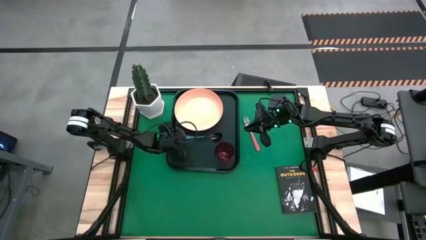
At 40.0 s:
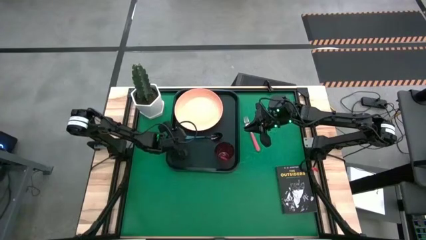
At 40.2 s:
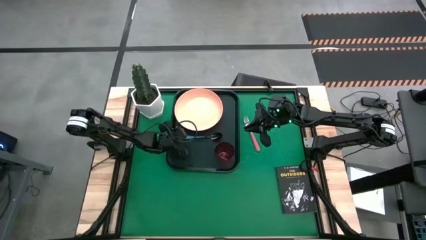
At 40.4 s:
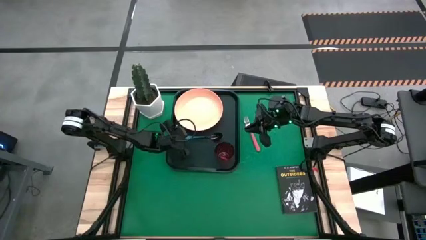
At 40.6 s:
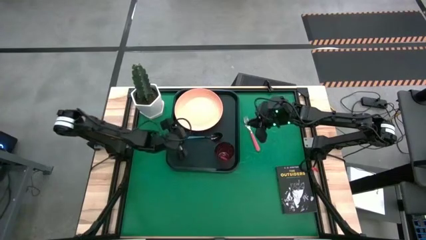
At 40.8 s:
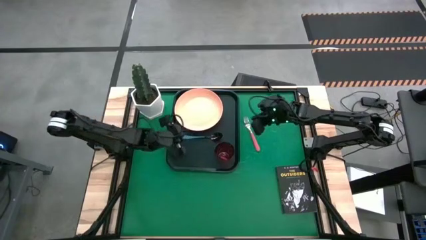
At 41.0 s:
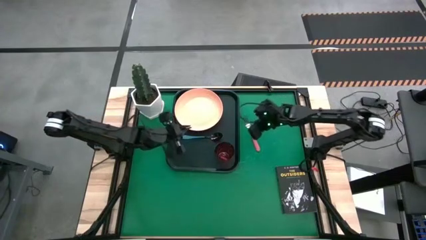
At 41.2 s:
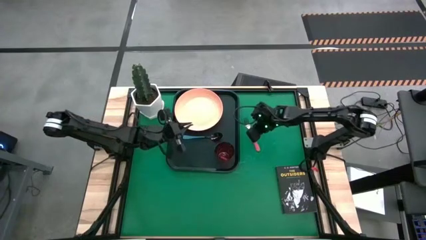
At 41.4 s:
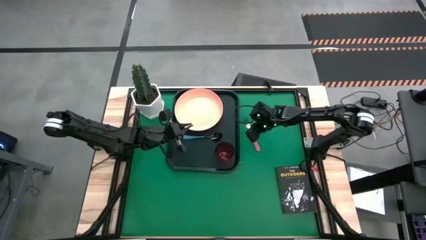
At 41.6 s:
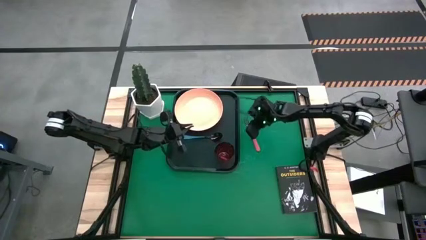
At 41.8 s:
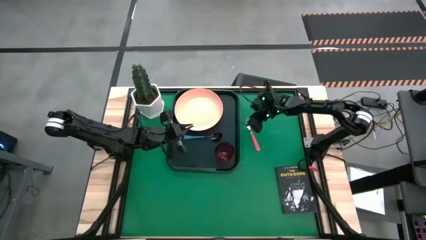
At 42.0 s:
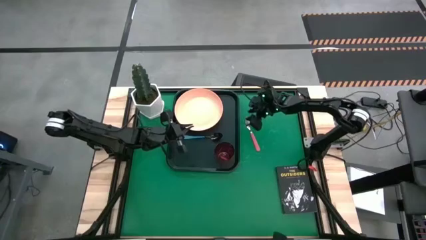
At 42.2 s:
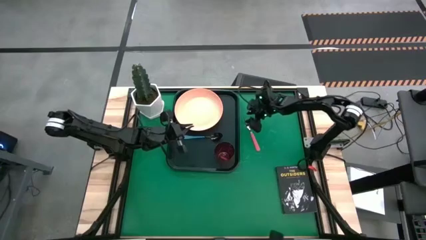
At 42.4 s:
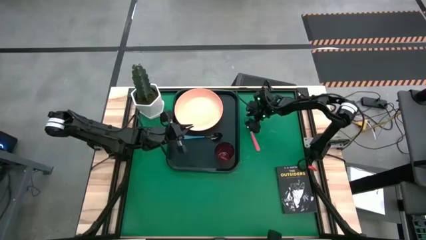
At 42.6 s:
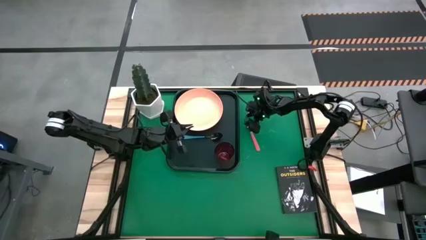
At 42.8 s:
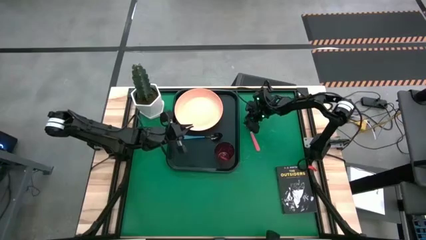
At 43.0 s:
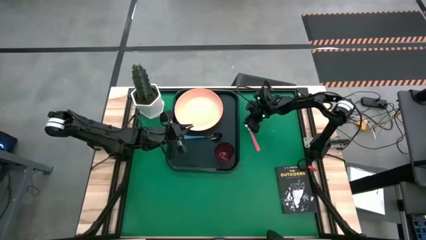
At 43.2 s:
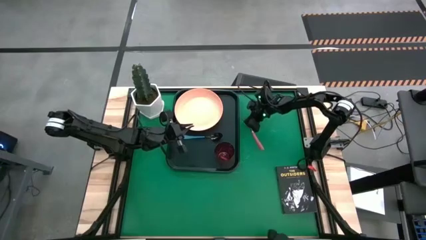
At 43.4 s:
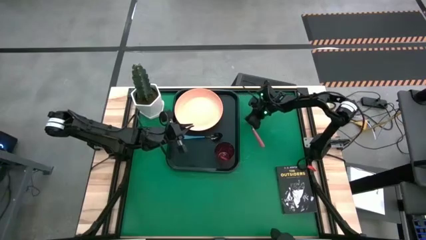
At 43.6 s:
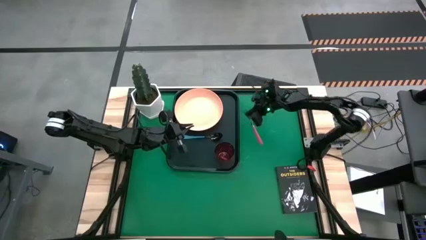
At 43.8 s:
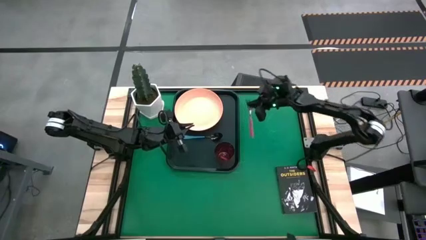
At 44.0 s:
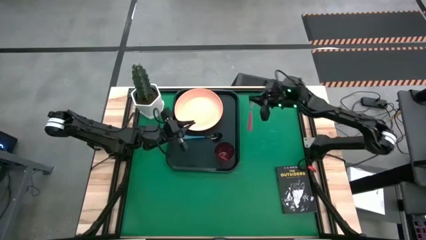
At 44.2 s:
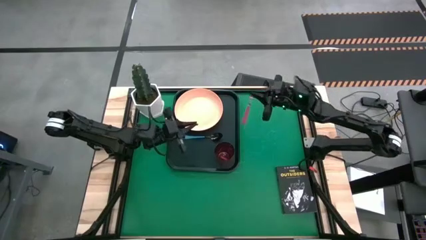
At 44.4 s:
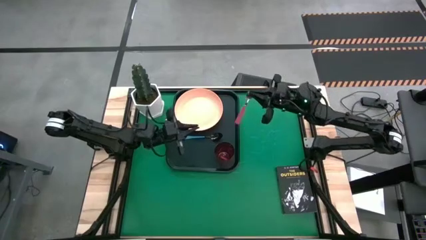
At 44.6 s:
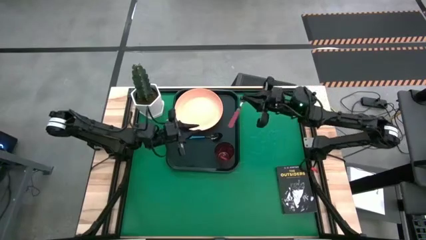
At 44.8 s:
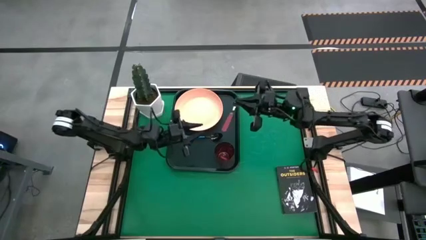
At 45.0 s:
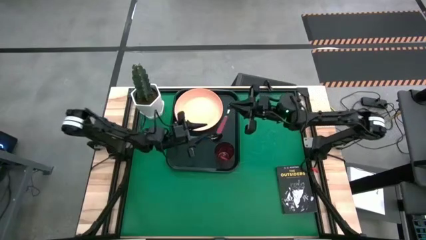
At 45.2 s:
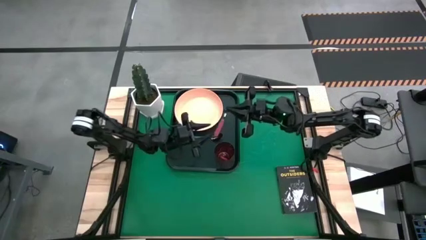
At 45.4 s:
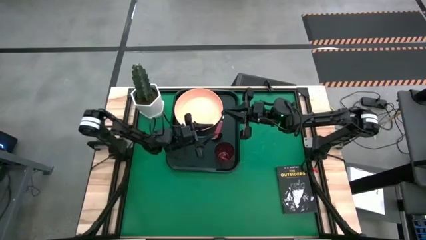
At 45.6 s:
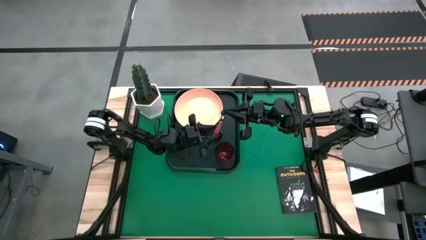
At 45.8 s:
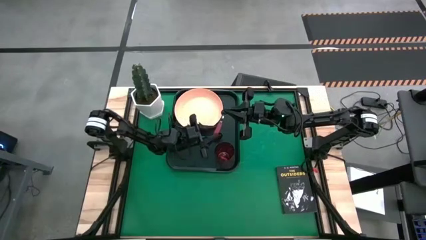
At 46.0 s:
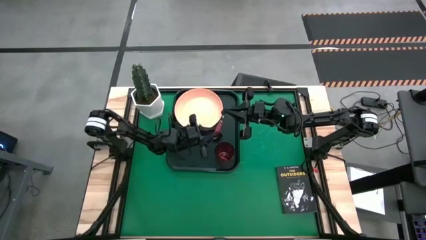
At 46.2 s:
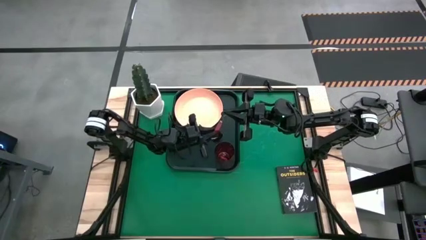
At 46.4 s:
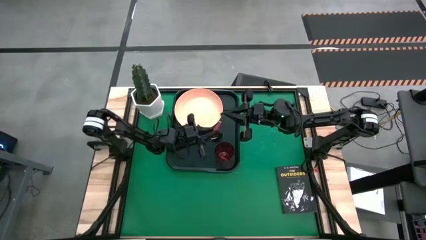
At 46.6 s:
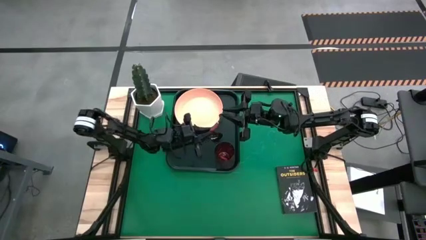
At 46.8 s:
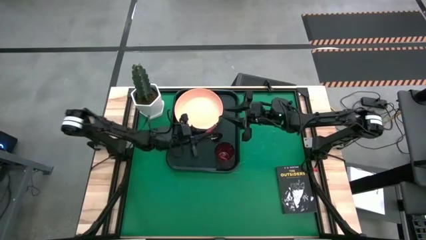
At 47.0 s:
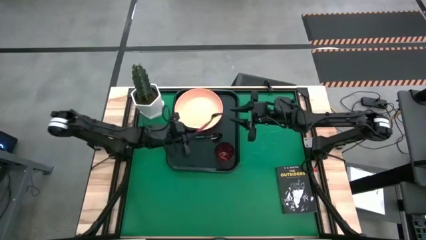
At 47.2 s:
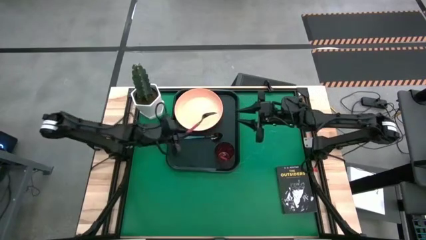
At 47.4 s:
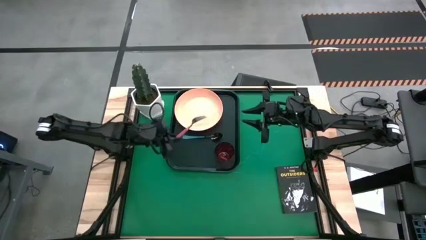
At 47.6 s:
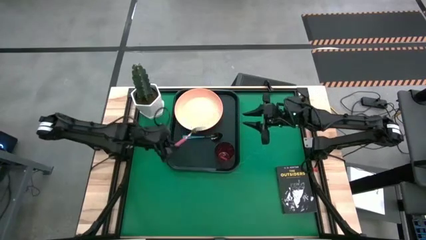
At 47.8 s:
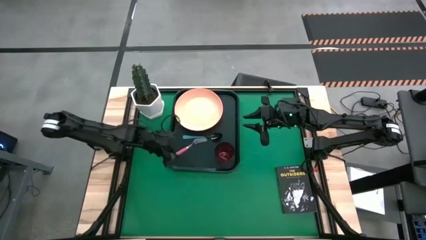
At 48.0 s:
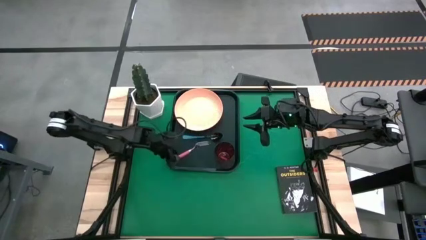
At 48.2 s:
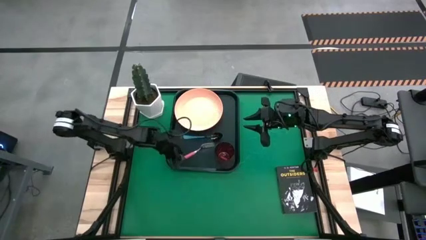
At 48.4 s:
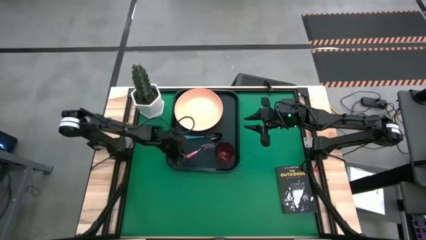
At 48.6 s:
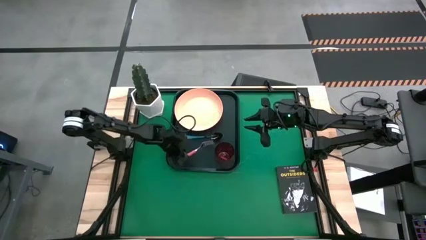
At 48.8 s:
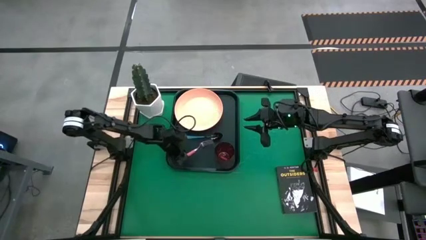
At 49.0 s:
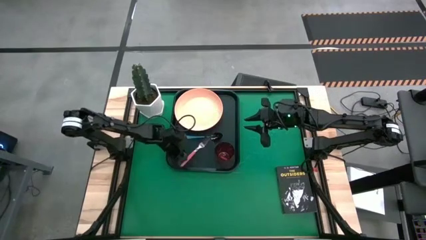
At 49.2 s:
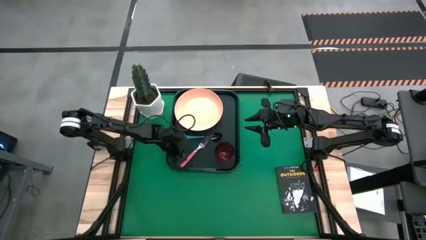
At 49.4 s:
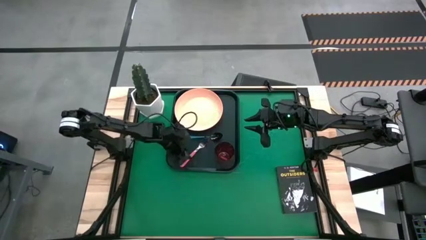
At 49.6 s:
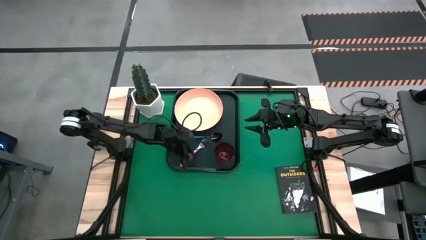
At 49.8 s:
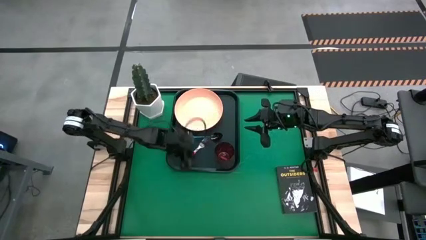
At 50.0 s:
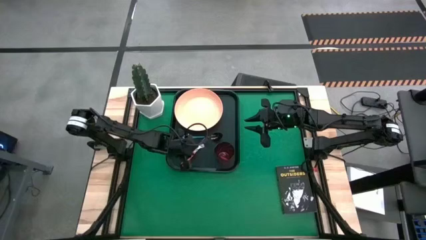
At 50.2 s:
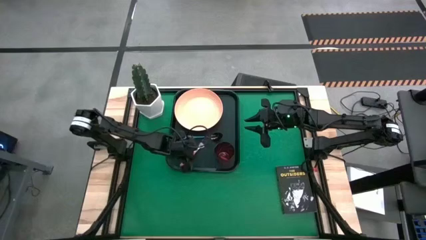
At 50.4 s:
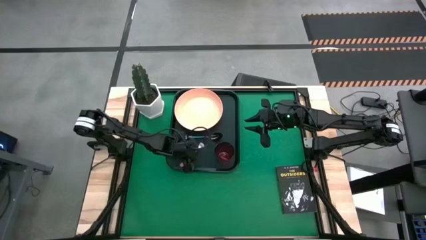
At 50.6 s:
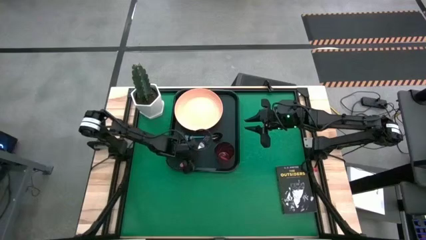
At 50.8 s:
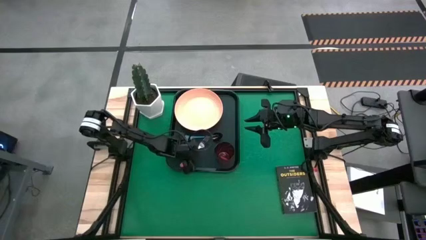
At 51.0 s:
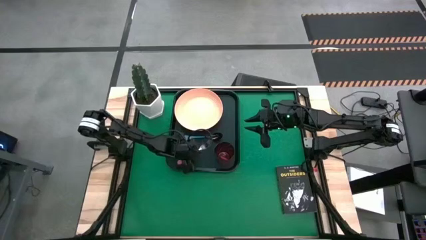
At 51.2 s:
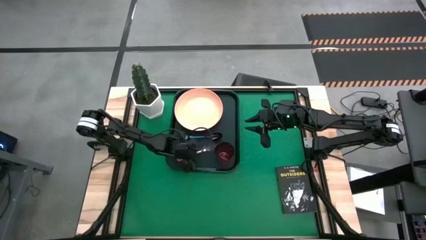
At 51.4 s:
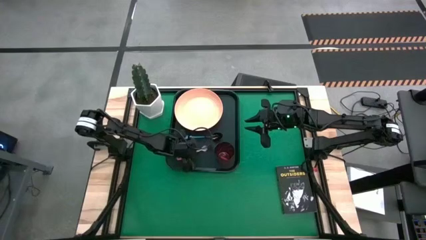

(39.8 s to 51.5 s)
Task: Pick and place plate/cup/fork/spoon on tray
Put the pink fork to the bottom of the blue spoon on the black serving tray

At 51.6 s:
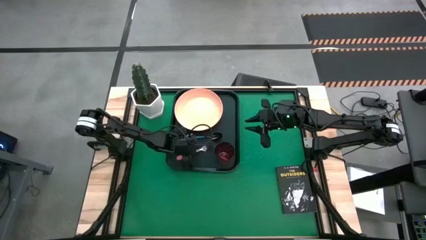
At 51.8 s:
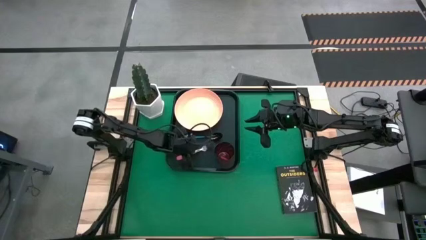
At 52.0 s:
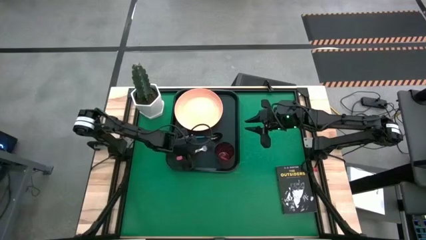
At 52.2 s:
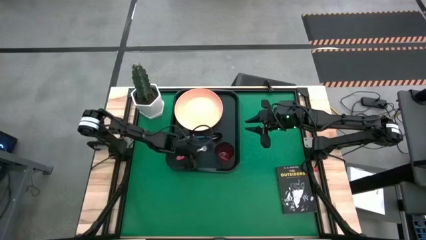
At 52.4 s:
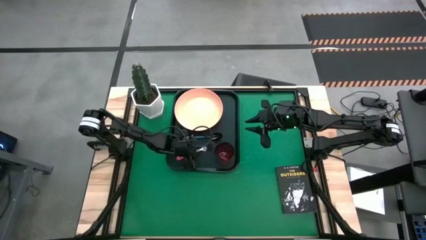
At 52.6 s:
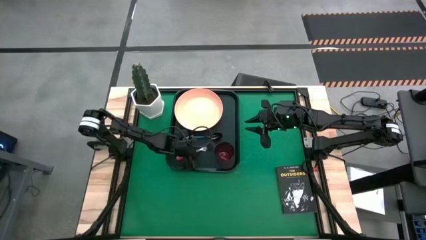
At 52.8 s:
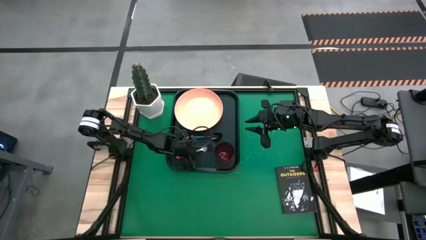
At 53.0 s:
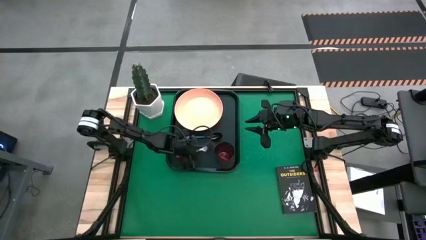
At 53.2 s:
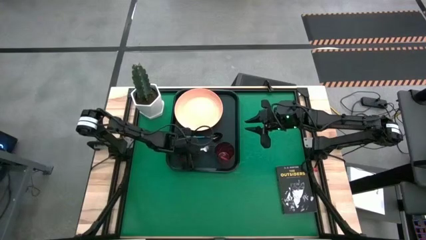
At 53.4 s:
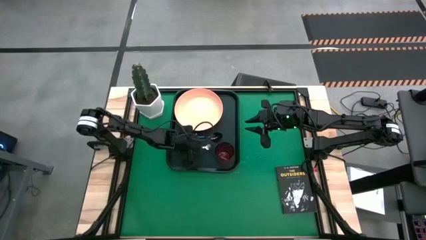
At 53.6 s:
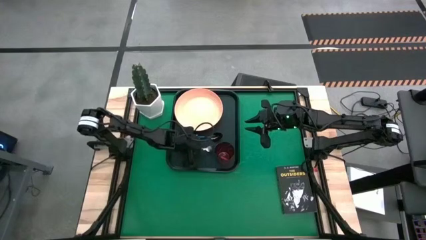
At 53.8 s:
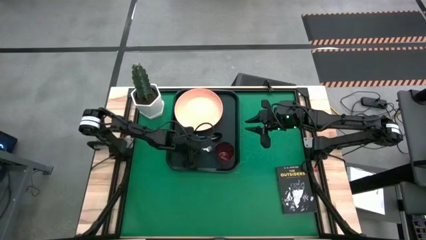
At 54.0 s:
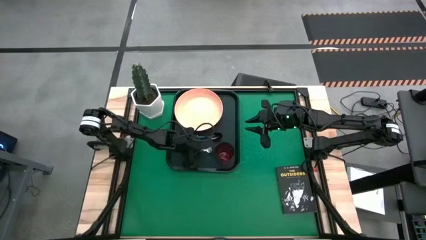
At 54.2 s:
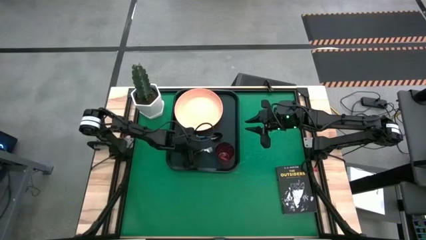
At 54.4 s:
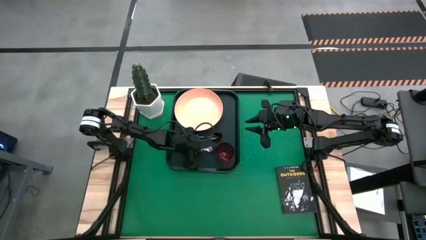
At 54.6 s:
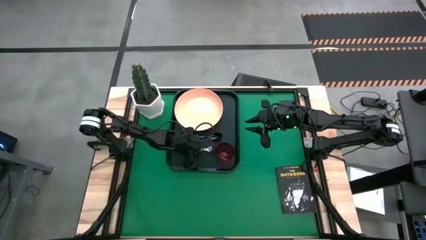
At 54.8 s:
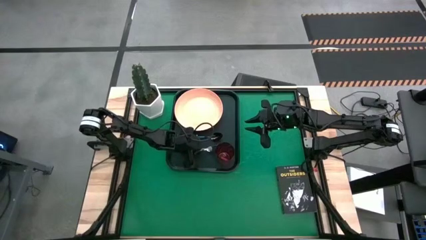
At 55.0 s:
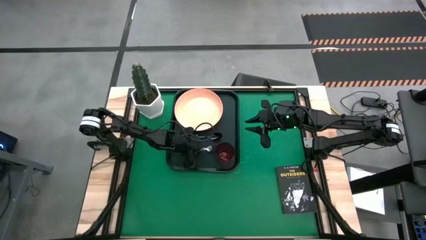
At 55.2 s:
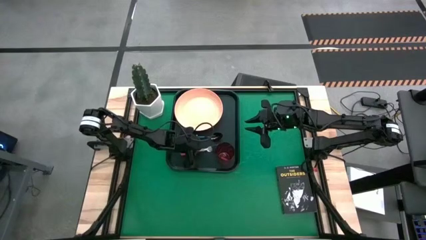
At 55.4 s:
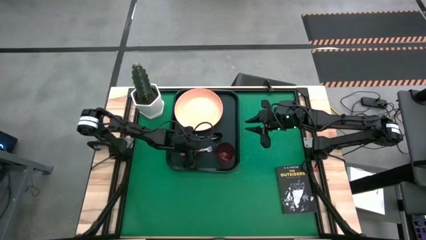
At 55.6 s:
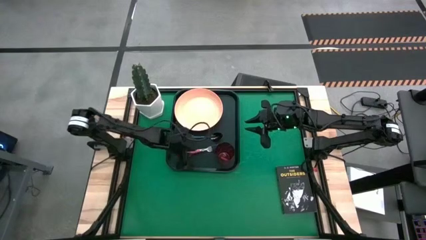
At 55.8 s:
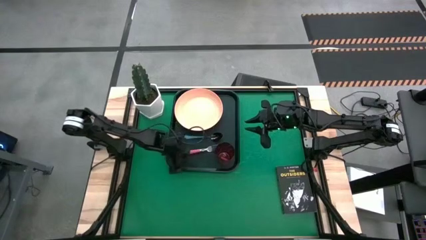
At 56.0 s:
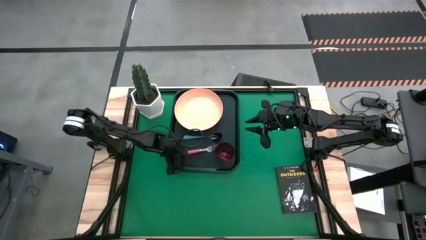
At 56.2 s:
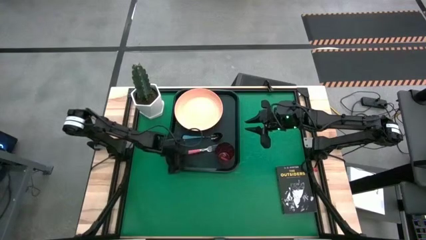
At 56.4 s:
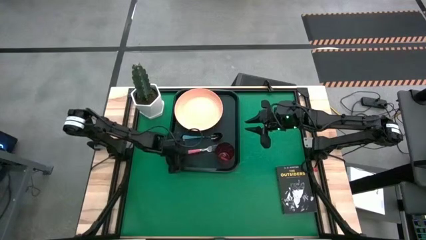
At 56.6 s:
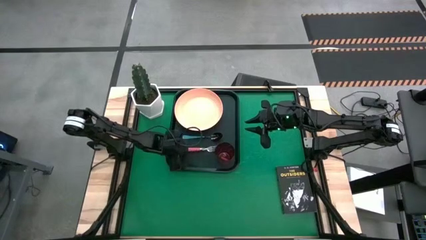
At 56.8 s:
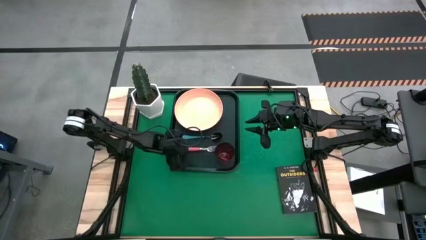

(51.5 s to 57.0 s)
Put the pink fork to the bottom of the blue spoon on the black serving tray
